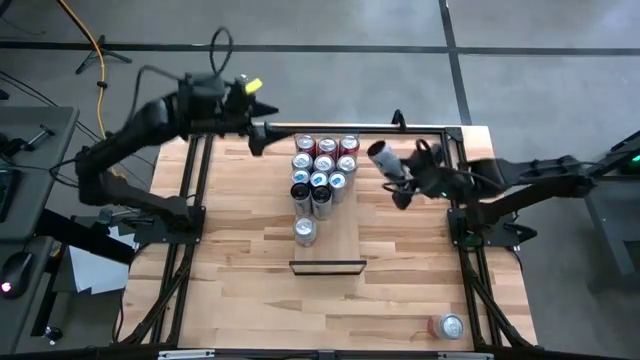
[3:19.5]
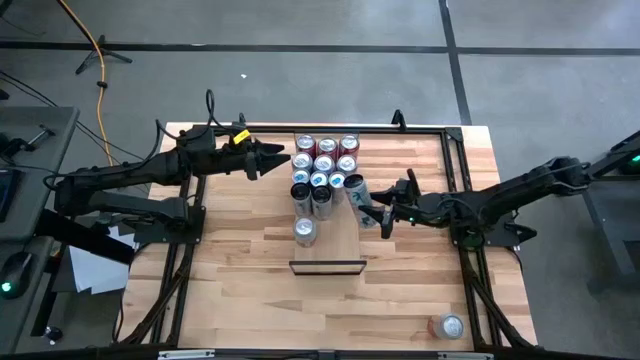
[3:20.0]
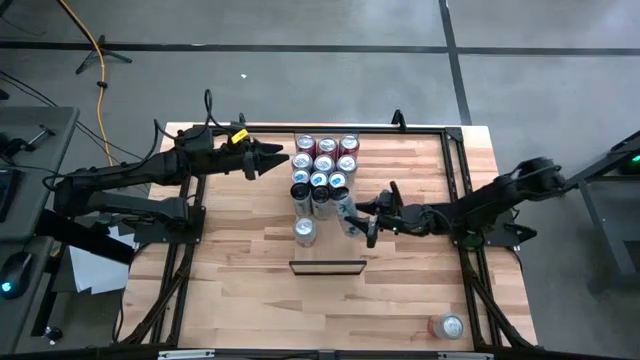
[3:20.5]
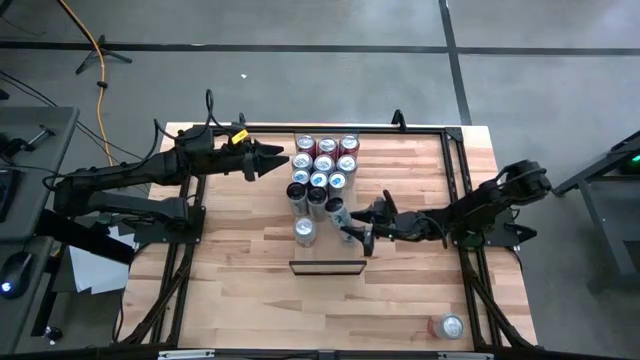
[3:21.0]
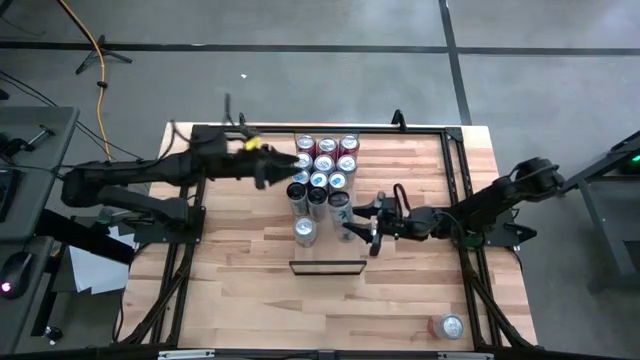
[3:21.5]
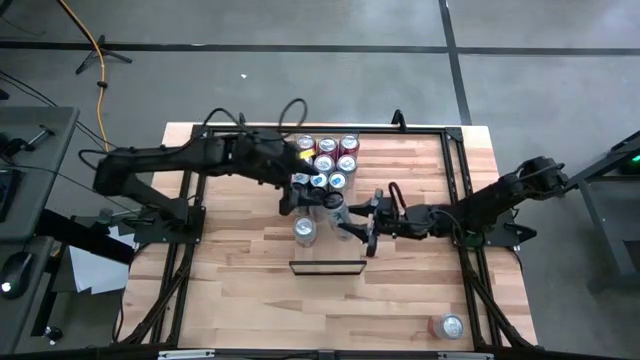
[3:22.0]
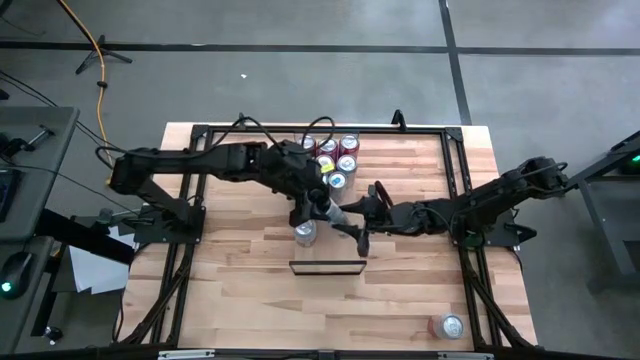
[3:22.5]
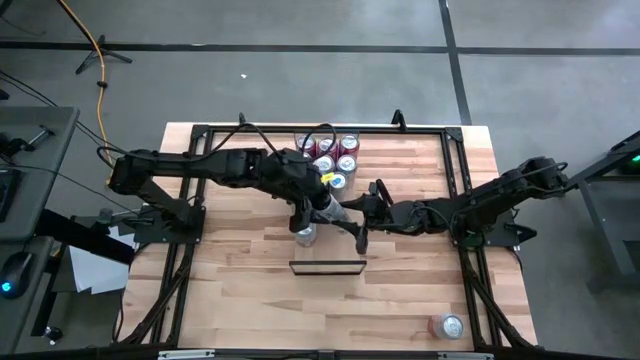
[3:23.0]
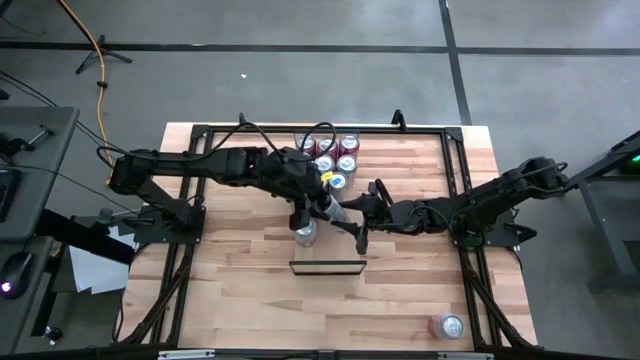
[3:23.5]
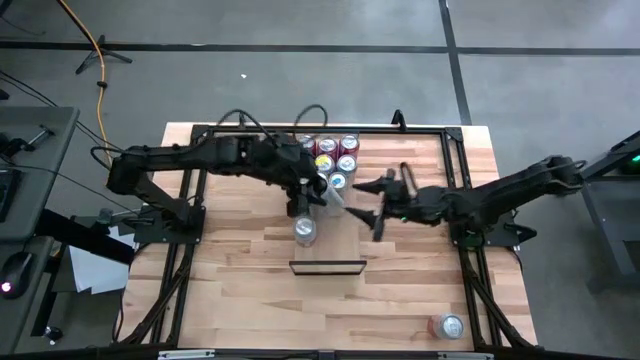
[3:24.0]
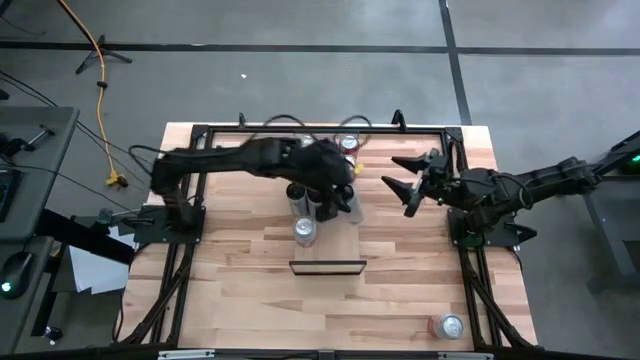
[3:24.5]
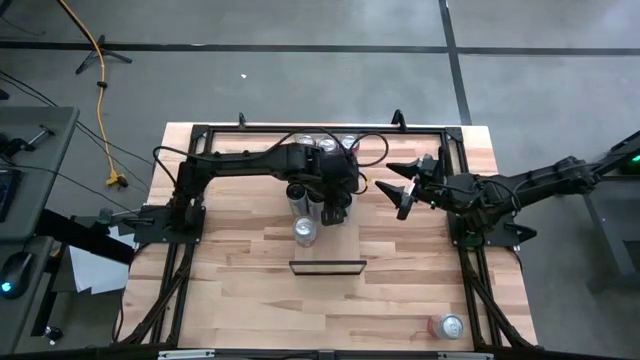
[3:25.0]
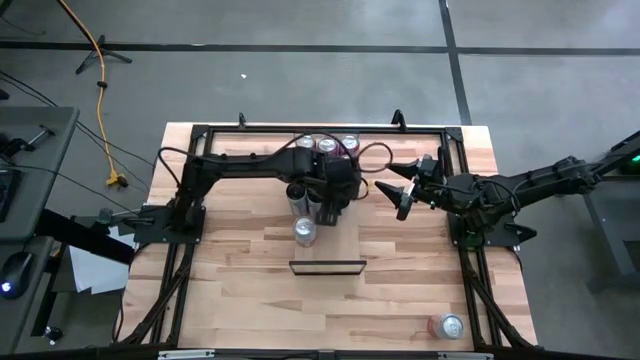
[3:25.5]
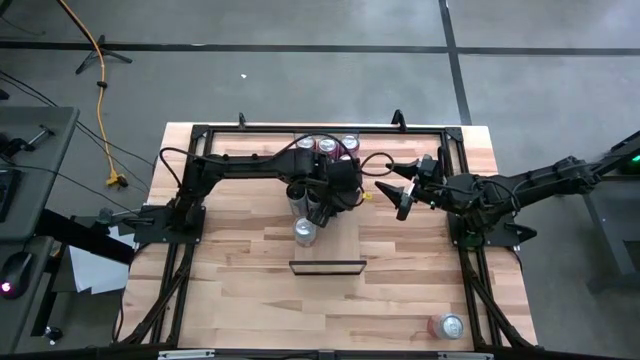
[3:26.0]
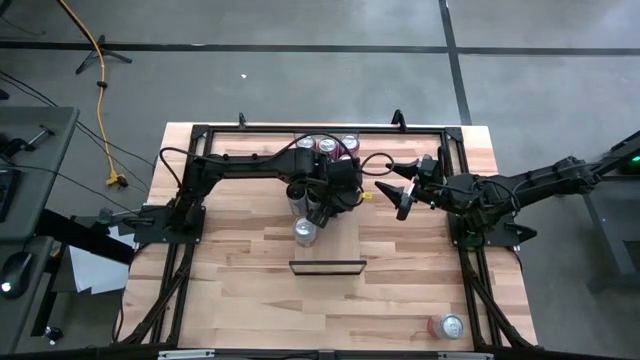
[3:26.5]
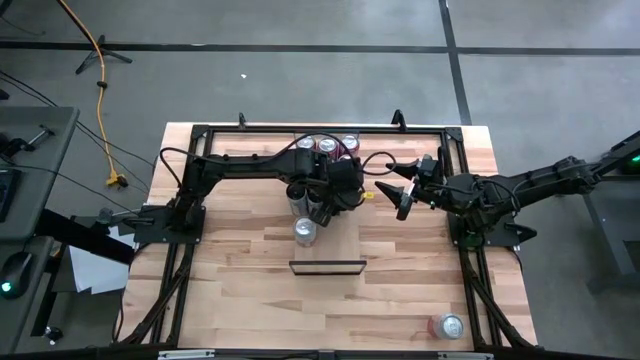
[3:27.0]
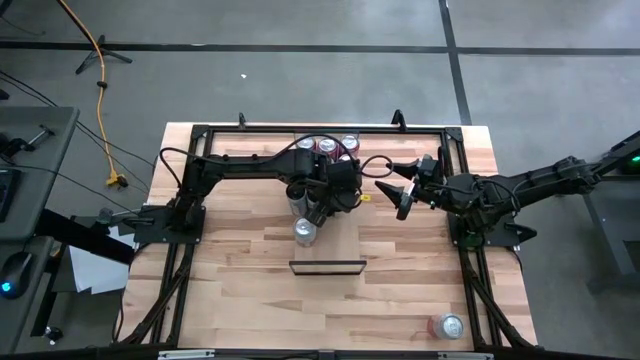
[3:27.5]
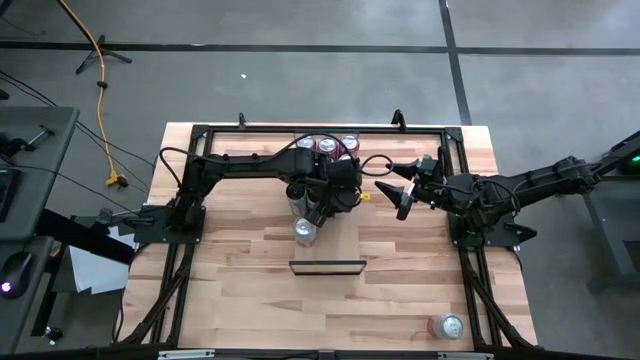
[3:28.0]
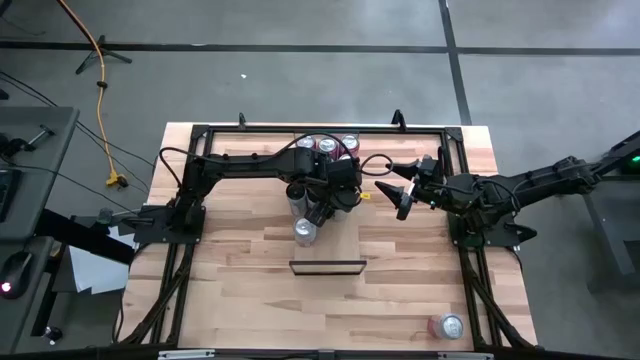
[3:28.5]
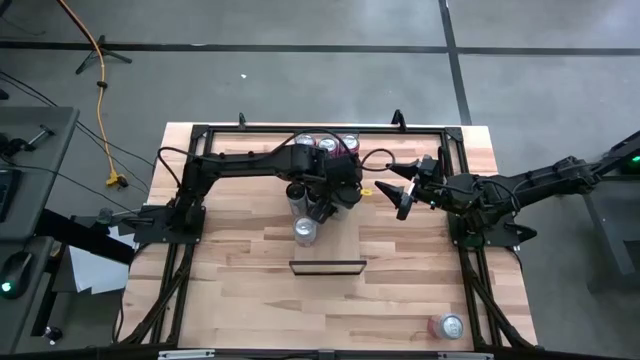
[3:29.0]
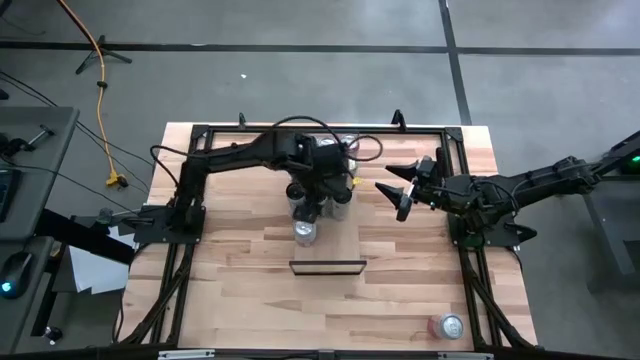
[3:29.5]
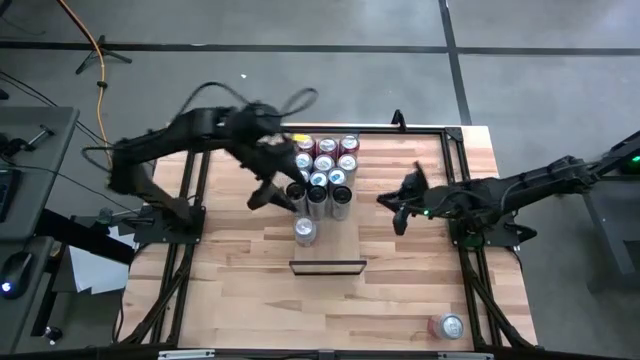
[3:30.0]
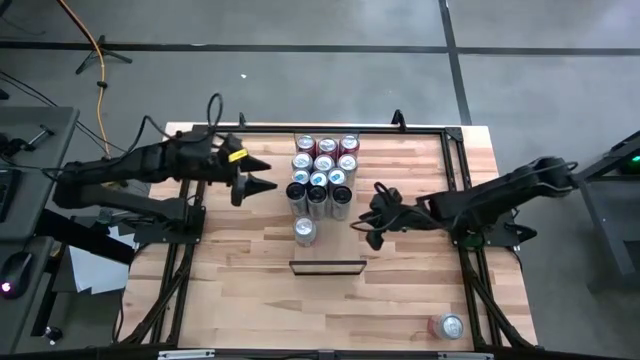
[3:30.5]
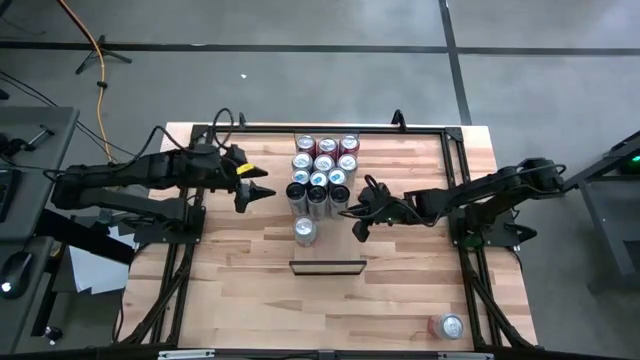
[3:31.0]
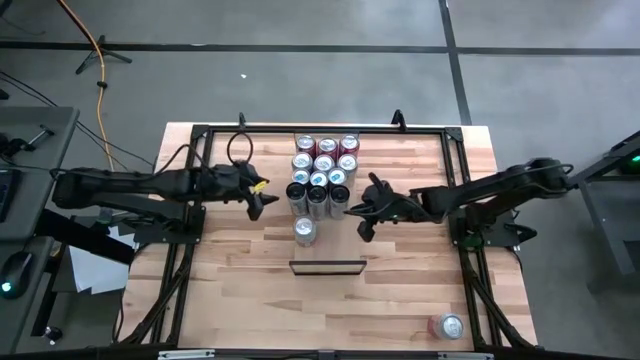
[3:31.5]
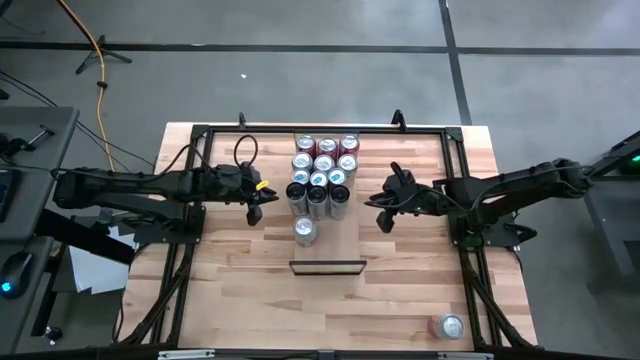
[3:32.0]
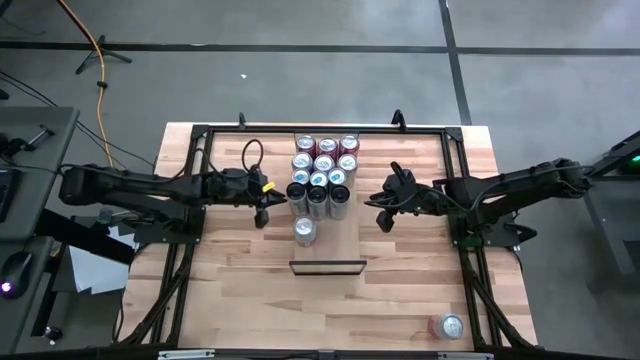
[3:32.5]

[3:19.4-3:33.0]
Task: Place canned beverage on shelf
Put the white pink soda can on the shelf aligned with the other white pink soda cans

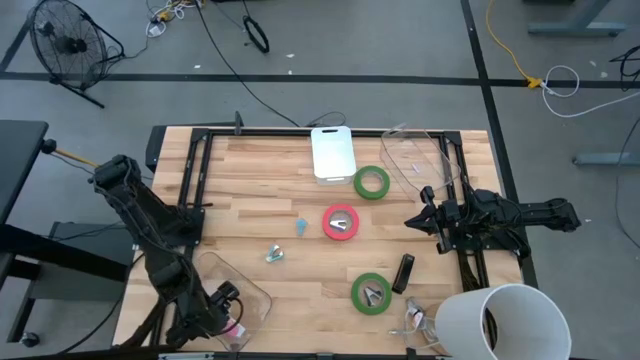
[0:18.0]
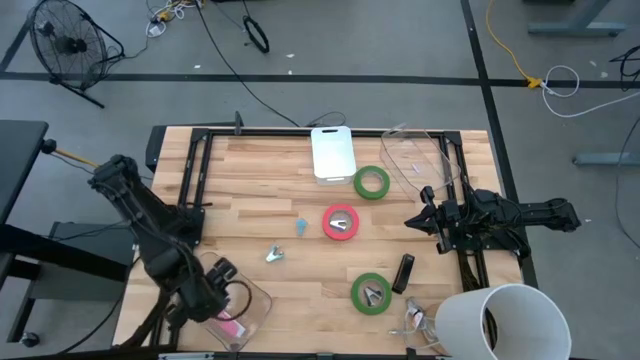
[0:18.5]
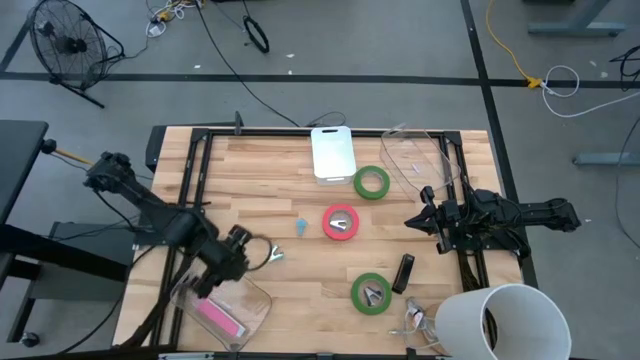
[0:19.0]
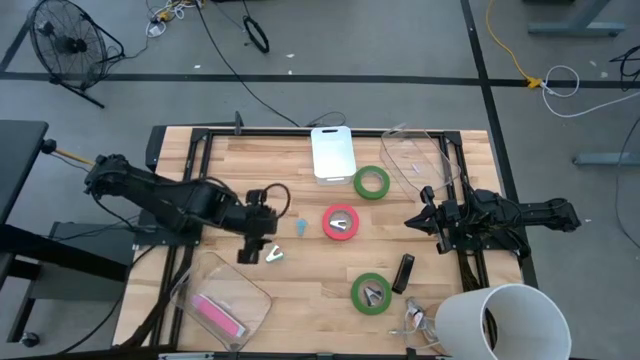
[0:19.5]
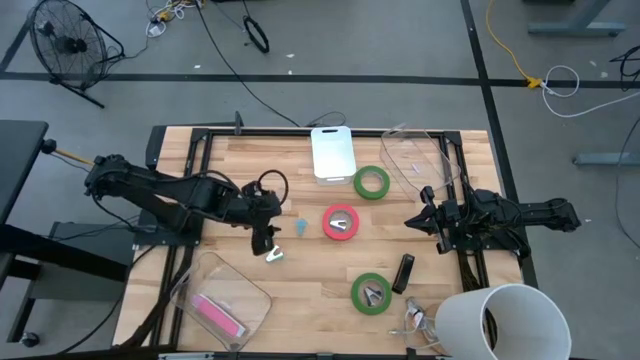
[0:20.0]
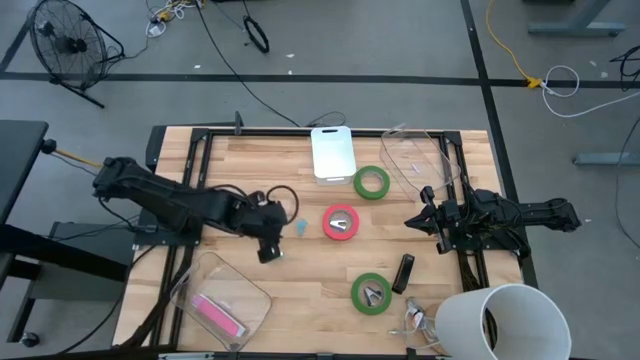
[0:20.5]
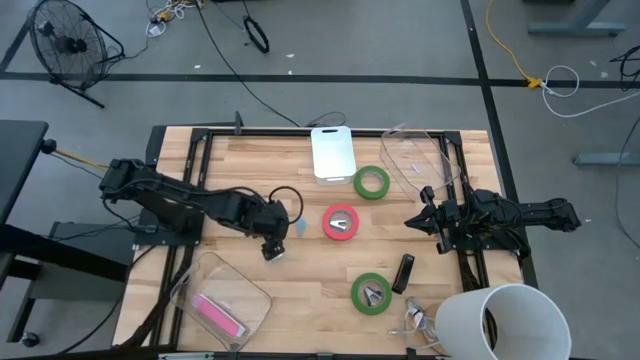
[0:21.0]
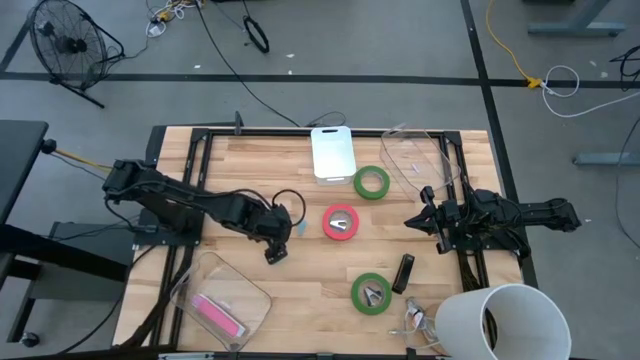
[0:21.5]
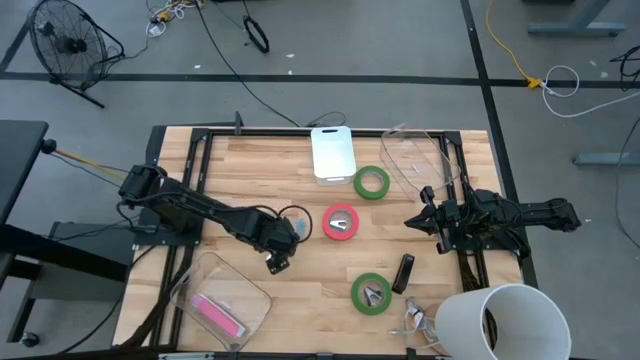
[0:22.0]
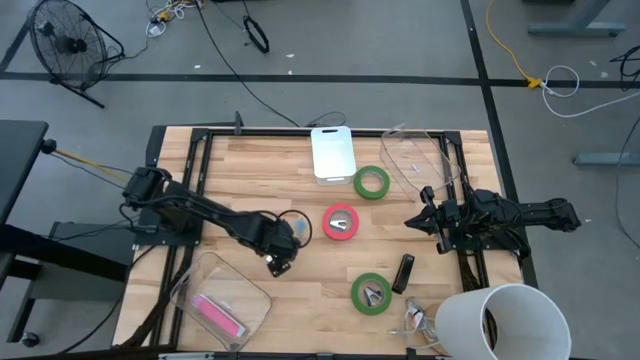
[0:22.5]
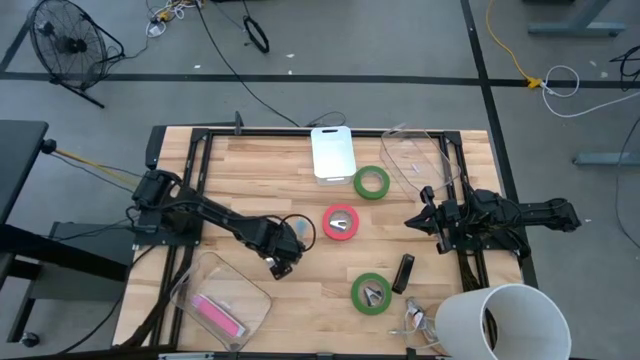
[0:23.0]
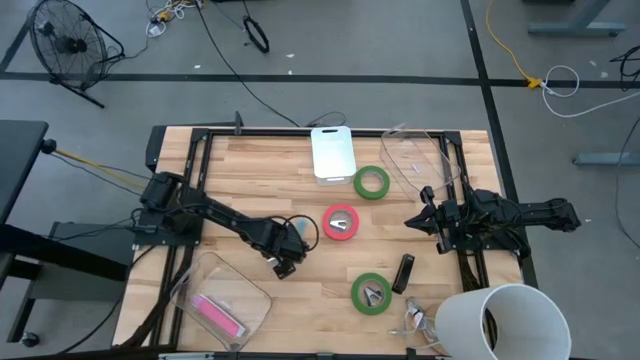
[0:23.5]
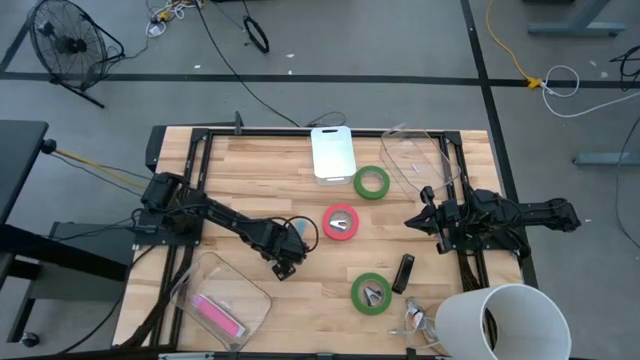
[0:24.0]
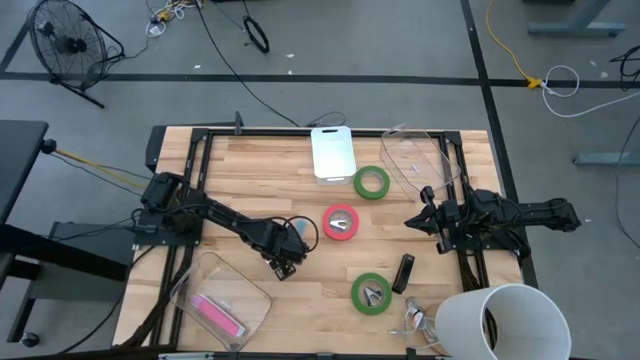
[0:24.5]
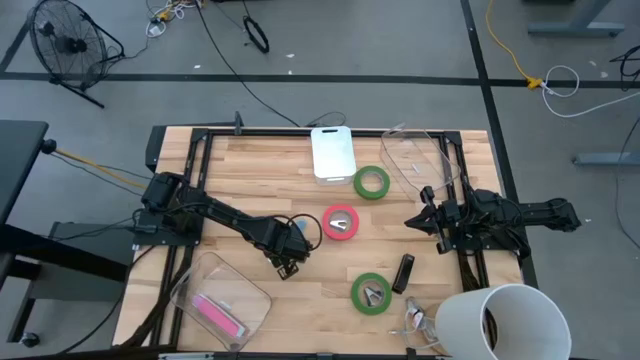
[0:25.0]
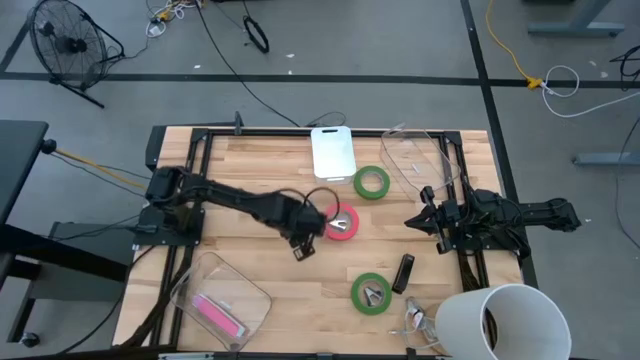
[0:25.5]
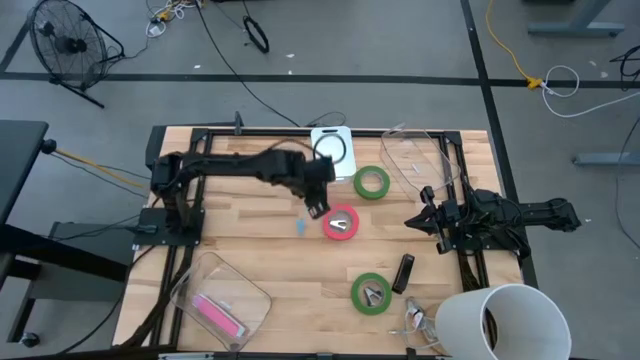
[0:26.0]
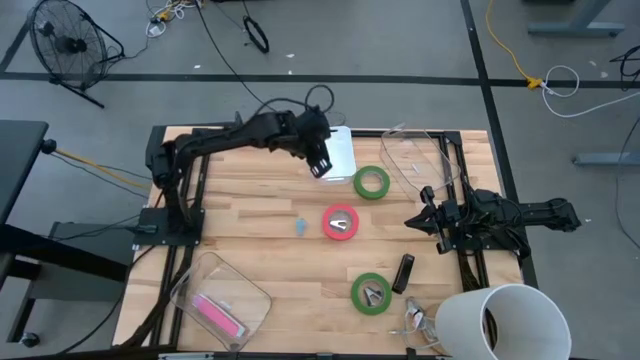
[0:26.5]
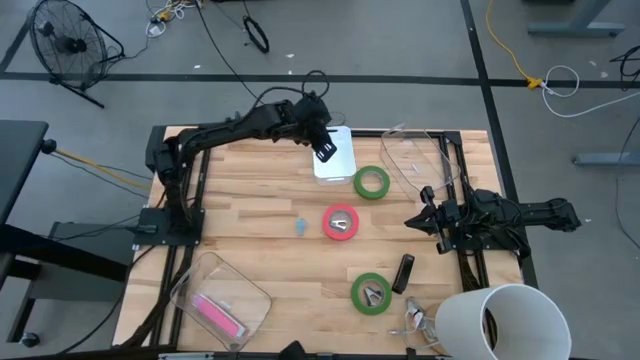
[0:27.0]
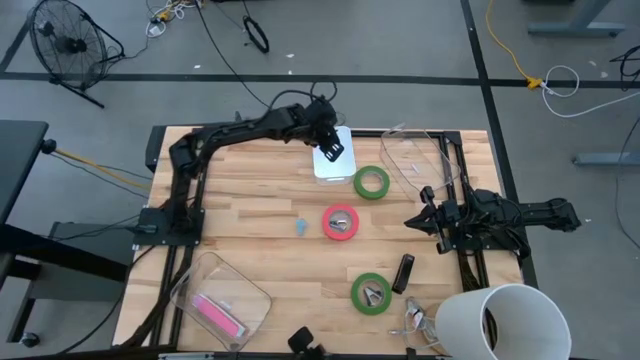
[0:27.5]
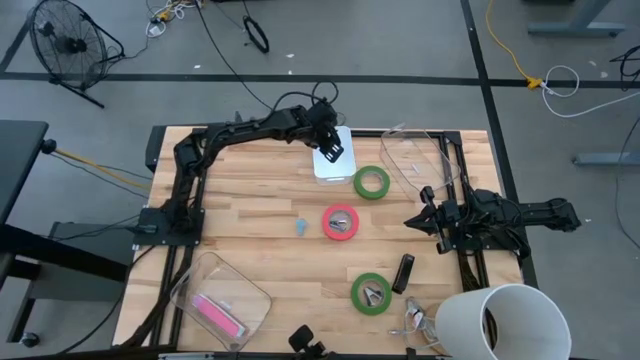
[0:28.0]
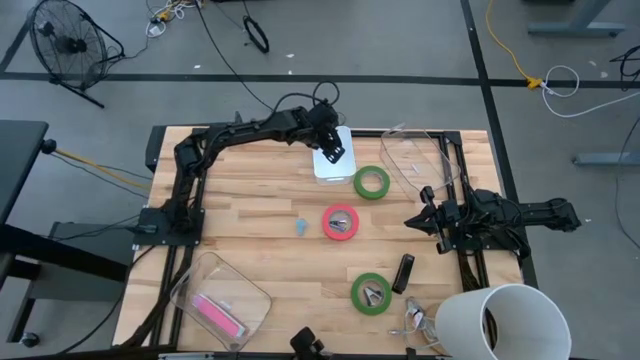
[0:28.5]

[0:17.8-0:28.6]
Task: Pick and place Stapler, Stapler remover, tape
Put the green staple remover into the white bin
